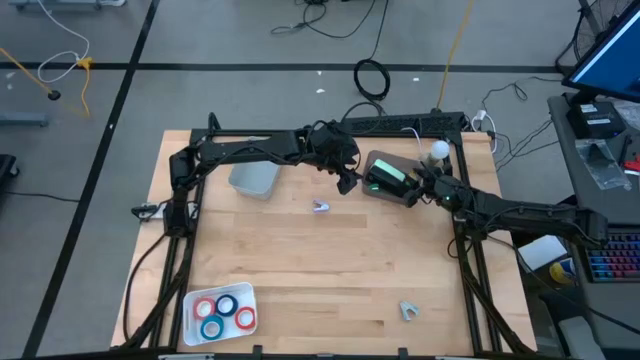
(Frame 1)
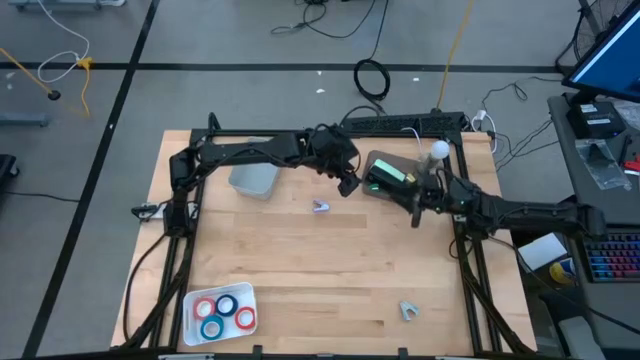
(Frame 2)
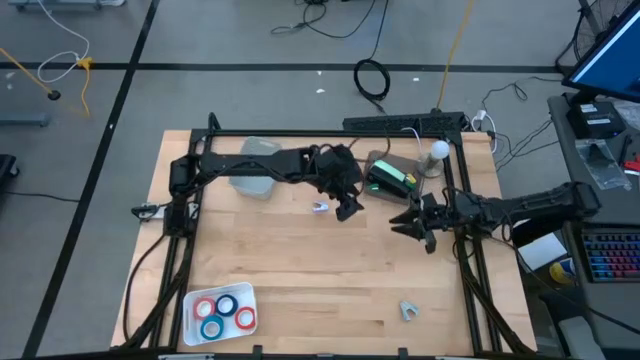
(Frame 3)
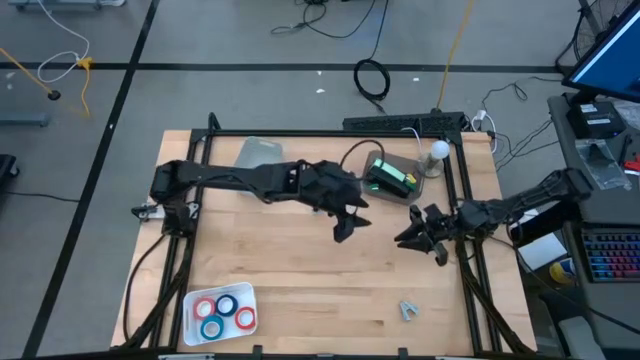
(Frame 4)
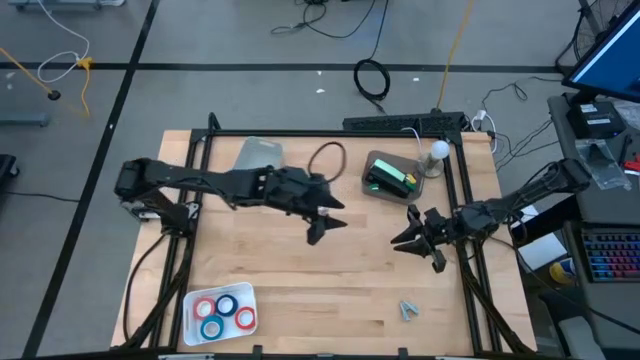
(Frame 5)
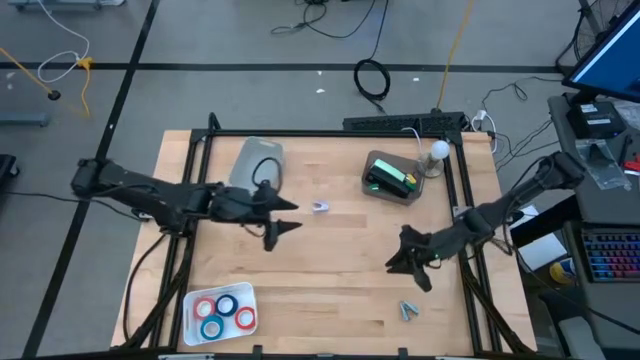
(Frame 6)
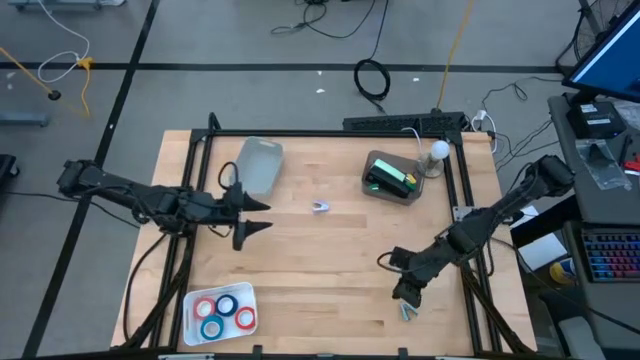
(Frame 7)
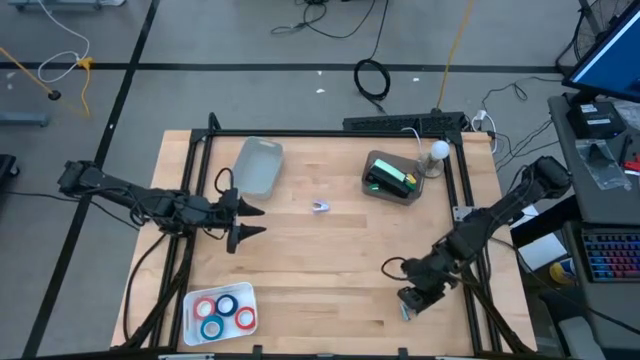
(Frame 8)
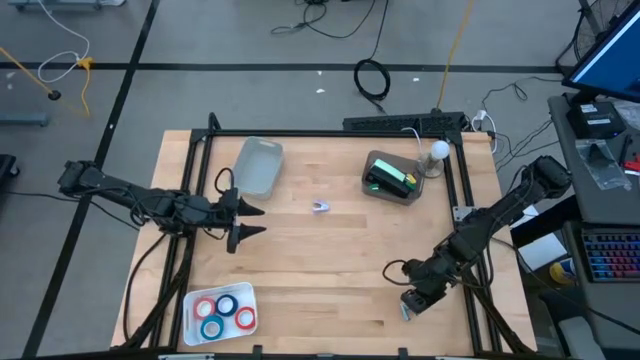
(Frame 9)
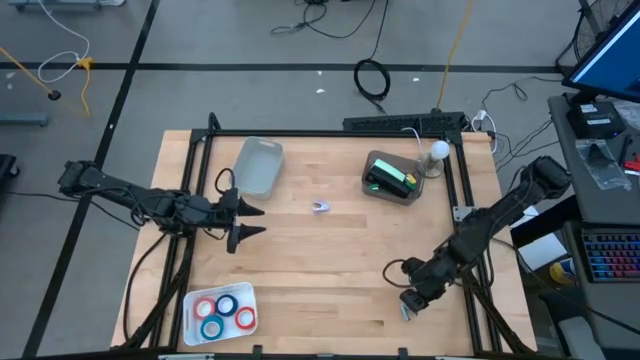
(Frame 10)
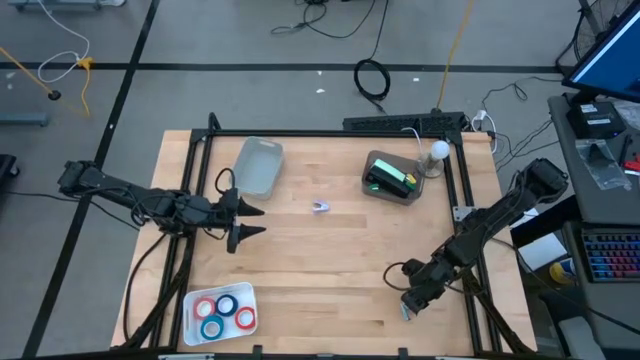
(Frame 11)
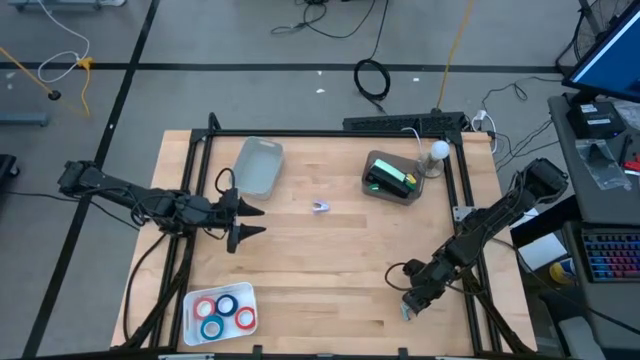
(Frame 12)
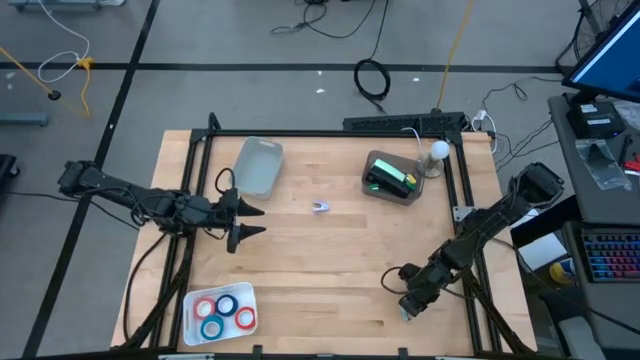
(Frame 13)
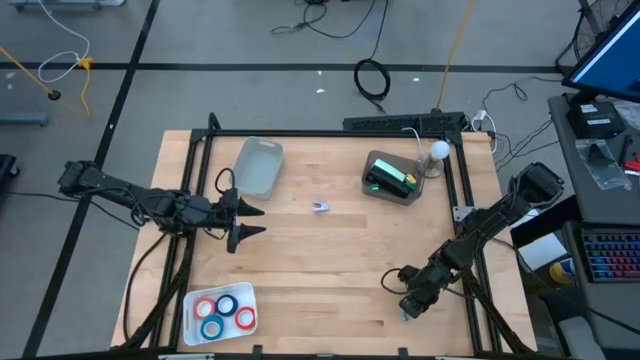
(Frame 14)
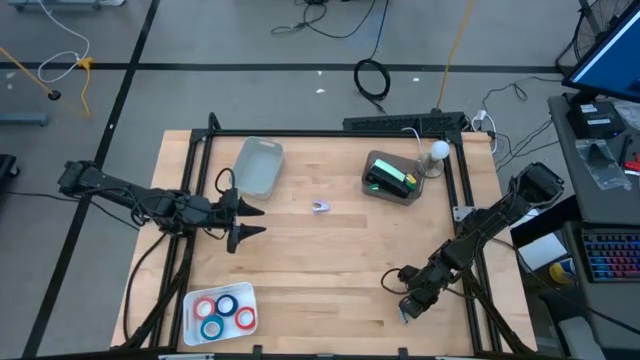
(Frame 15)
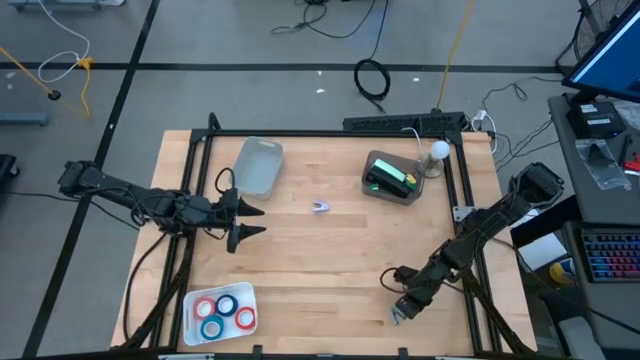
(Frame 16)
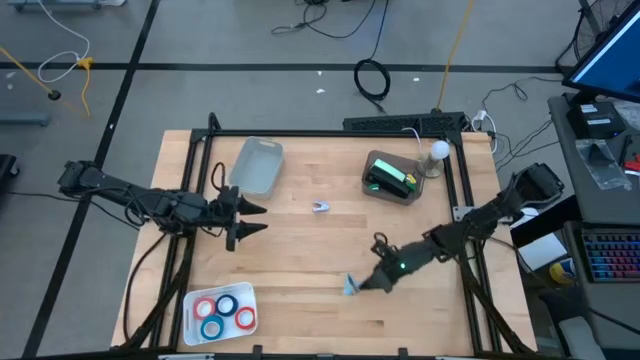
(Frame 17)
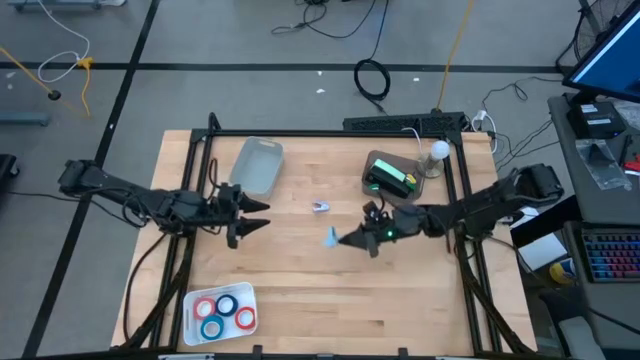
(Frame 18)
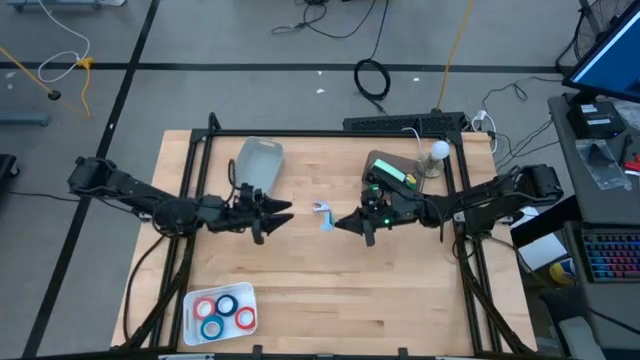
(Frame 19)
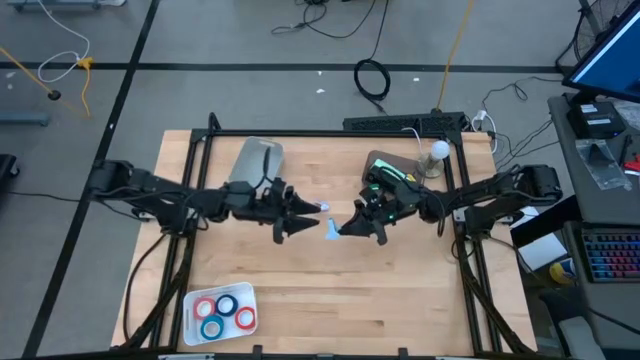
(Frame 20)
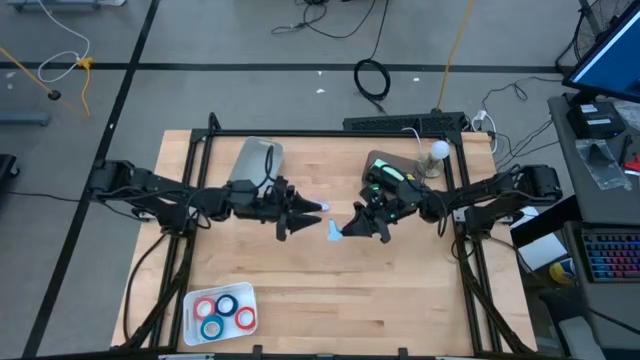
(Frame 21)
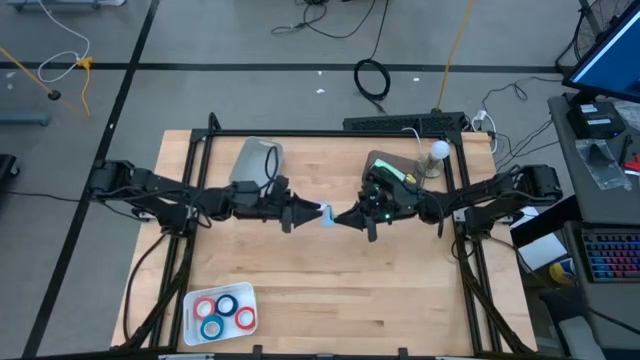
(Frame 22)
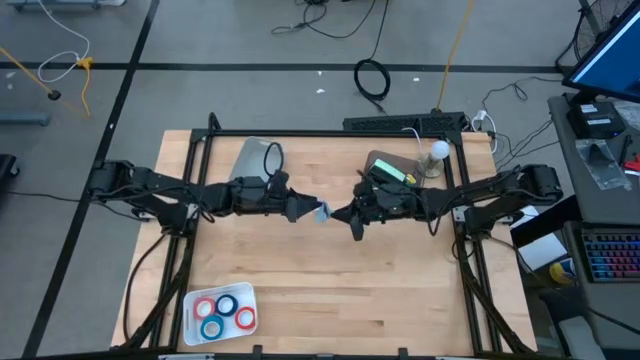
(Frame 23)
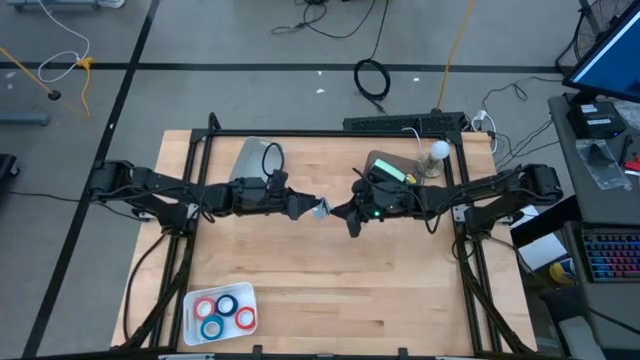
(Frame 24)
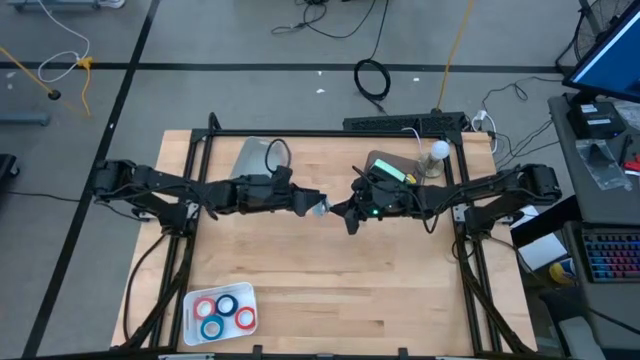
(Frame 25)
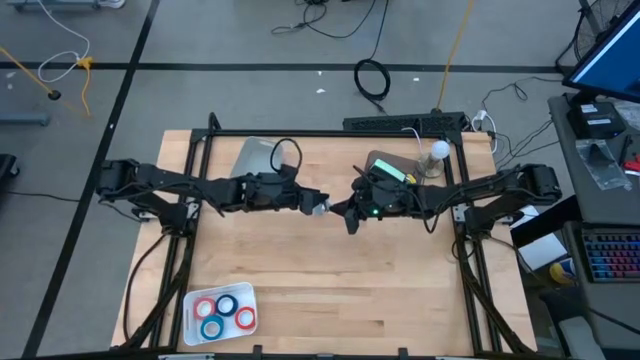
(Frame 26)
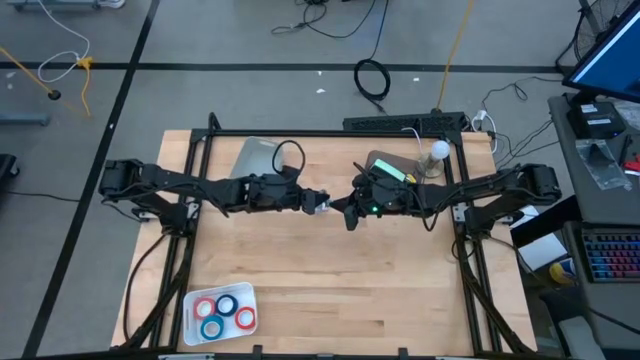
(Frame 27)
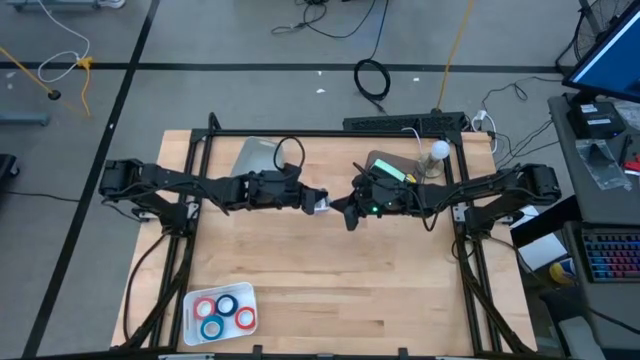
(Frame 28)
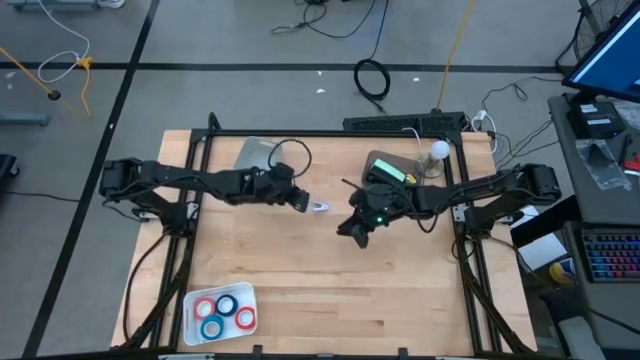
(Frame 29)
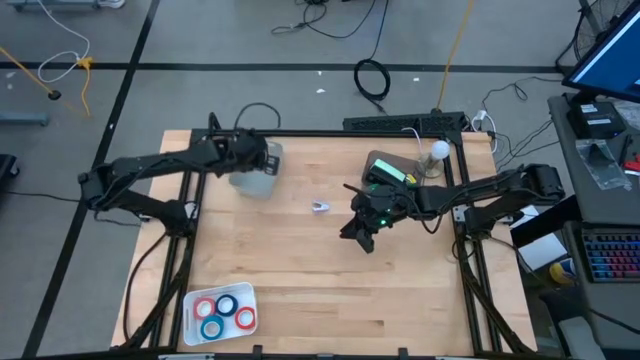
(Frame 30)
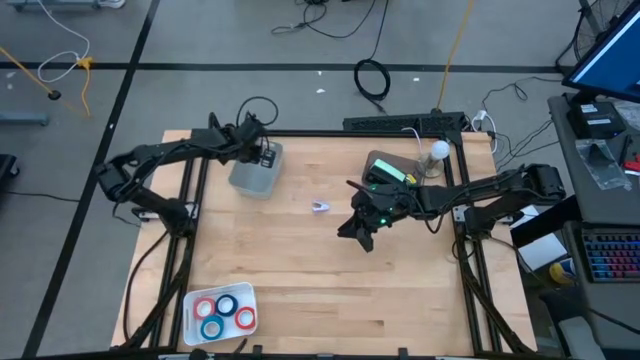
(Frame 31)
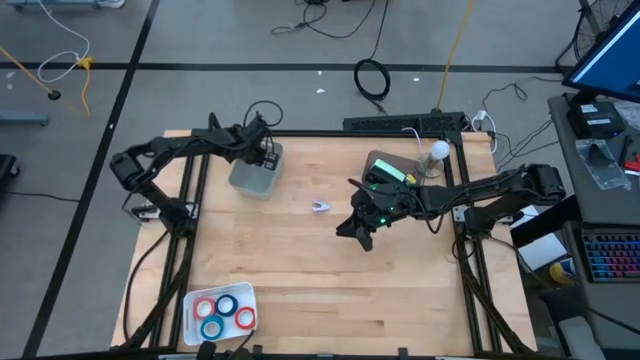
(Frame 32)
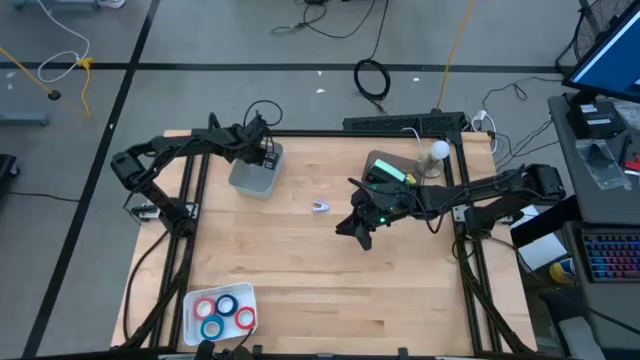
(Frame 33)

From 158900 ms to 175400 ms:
Task: Pick and place Stapler, Stapler remover, tape
Put the light blue staple remover into the gray bin

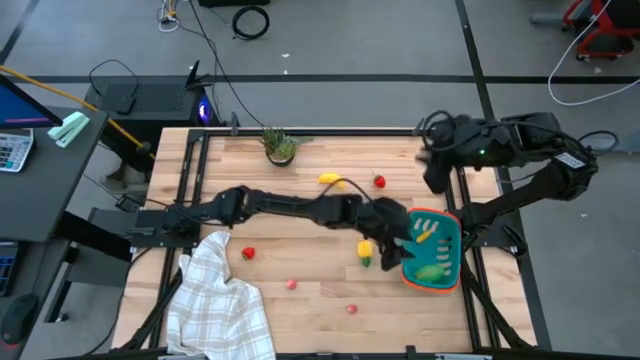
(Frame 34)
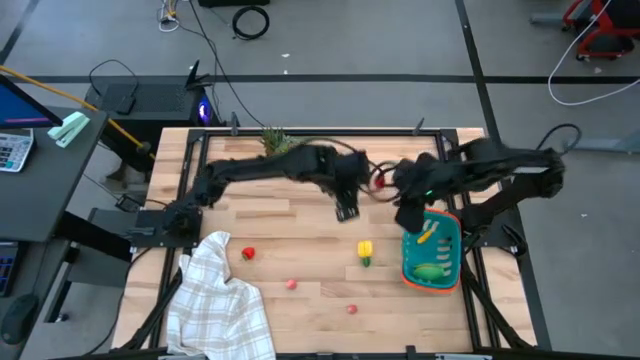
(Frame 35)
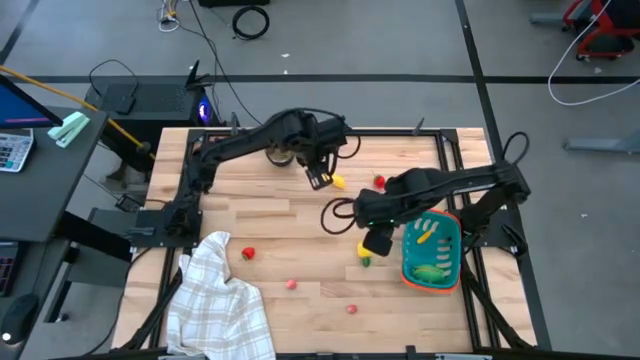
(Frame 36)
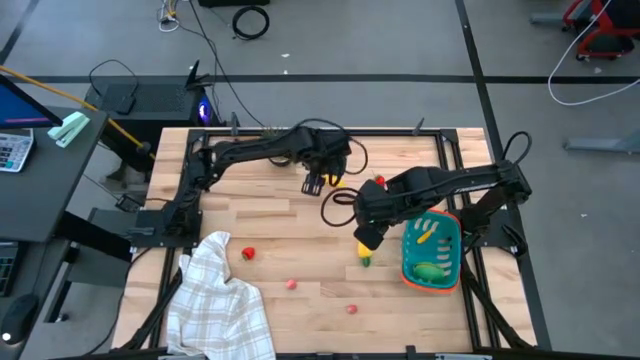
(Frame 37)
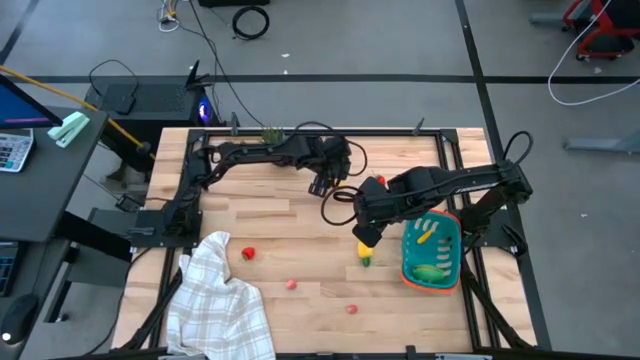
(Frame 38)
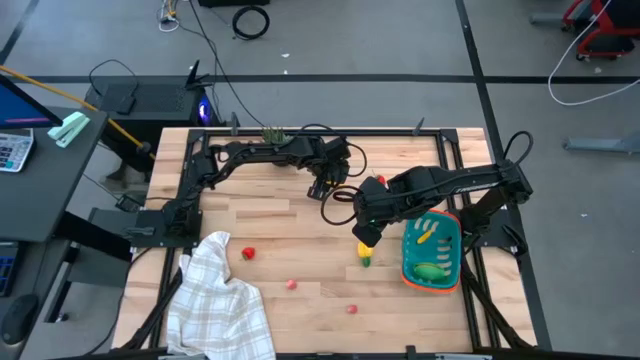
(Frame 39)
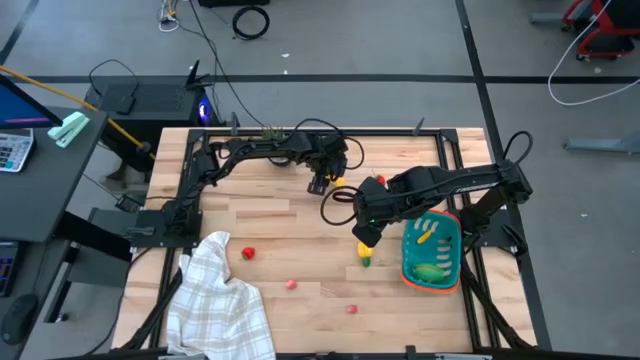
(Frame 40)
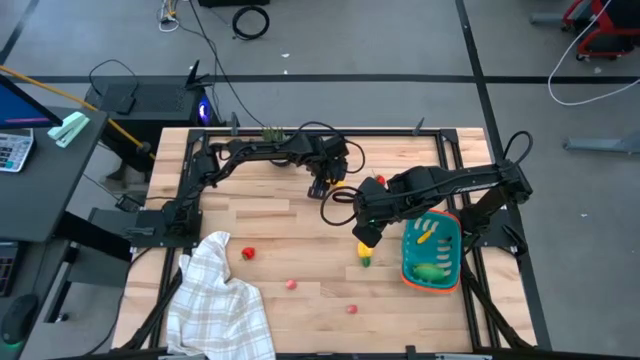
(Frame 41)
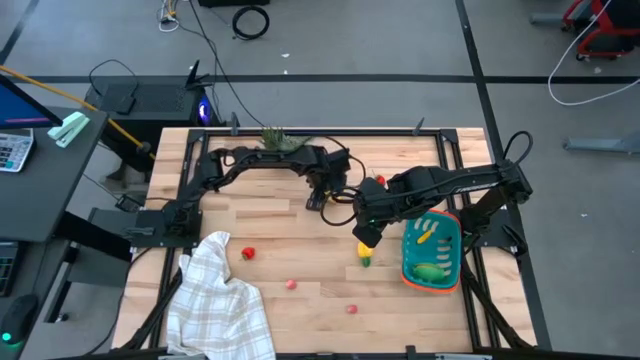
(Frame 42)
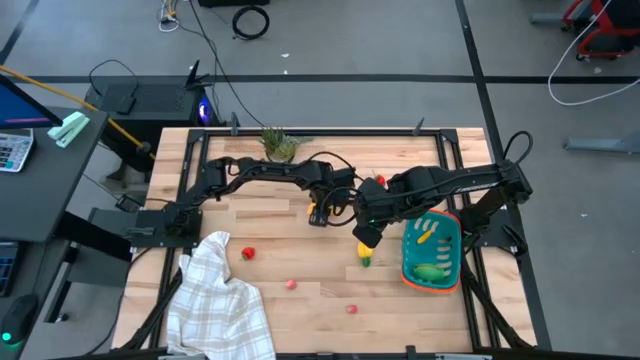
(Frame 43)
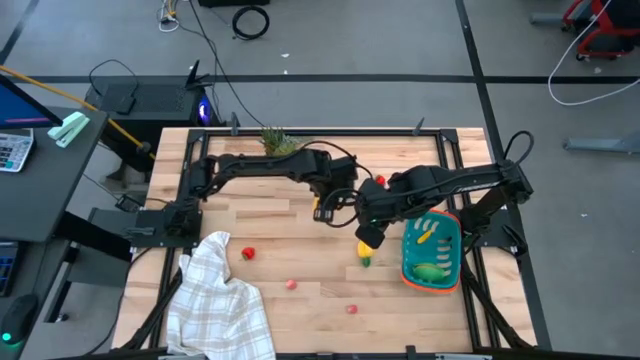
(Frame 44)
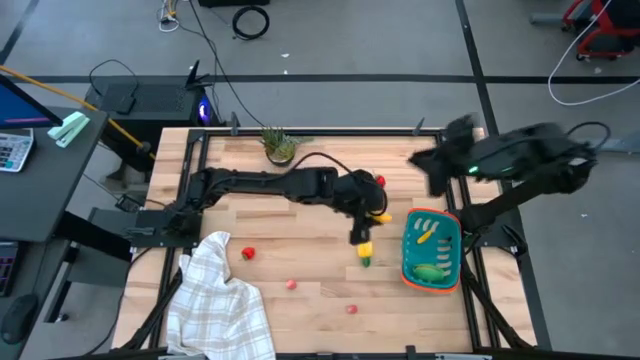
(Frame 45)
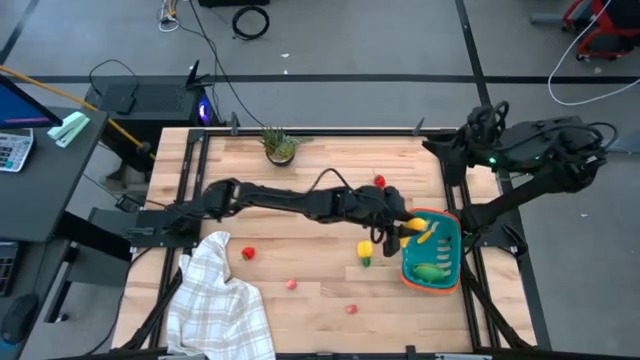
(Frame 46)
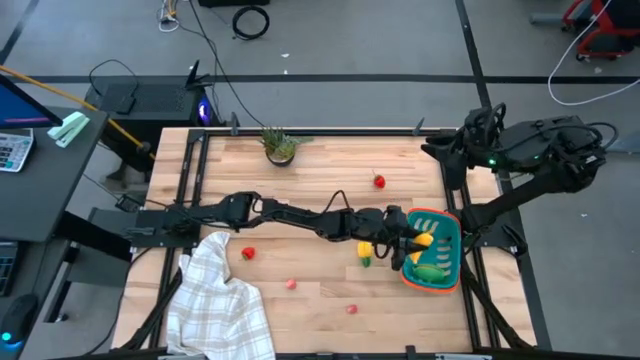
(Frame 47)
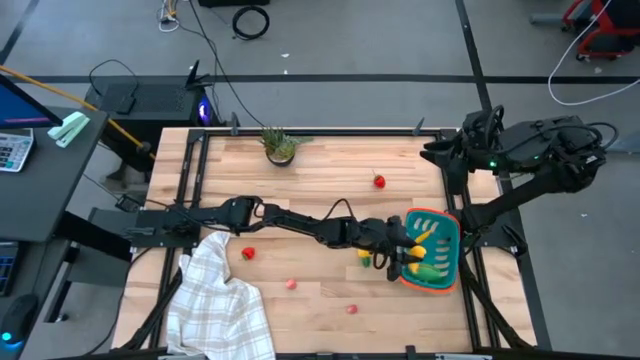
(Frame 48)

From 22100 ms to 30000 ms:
Task: Pick and placing Produce into tupperware
Put the yellow banana into the blue basket
